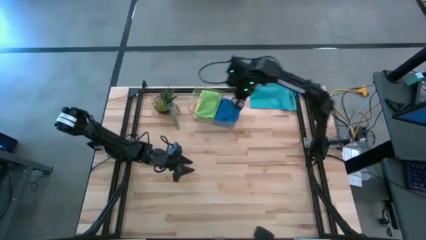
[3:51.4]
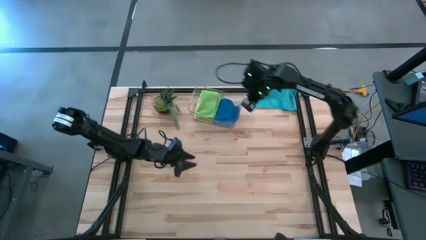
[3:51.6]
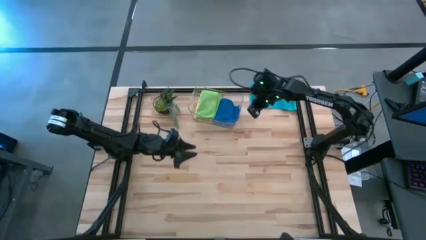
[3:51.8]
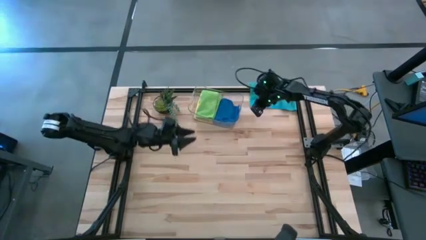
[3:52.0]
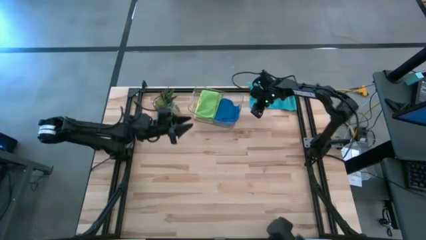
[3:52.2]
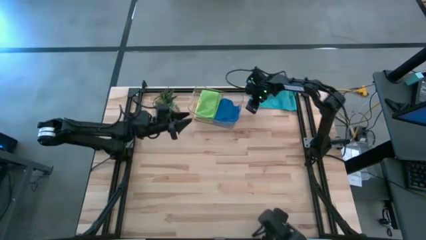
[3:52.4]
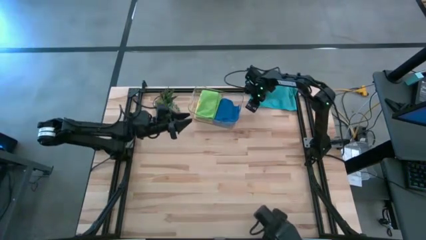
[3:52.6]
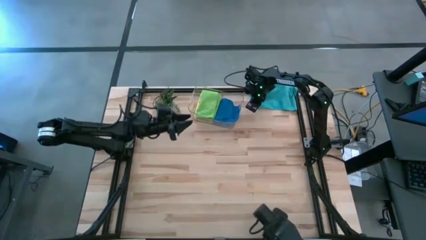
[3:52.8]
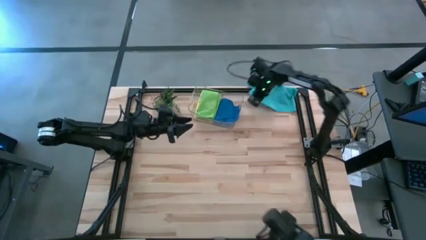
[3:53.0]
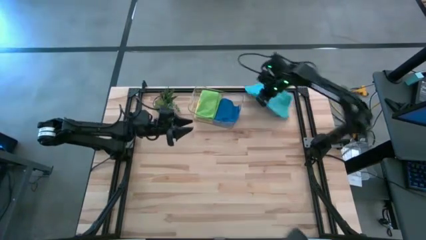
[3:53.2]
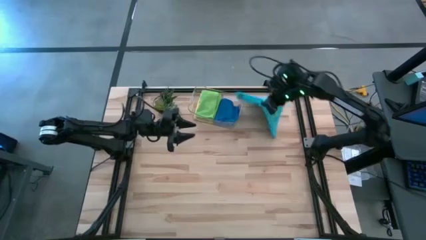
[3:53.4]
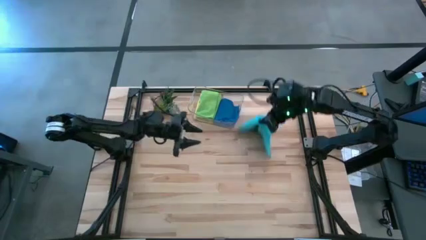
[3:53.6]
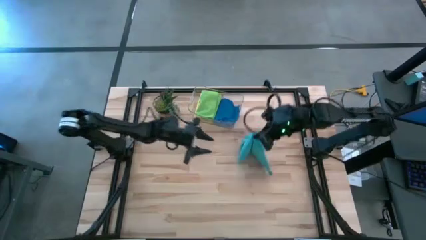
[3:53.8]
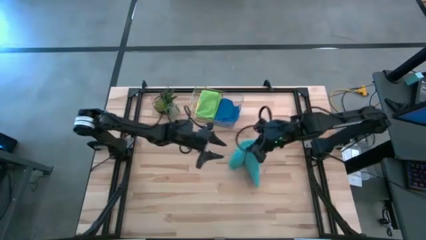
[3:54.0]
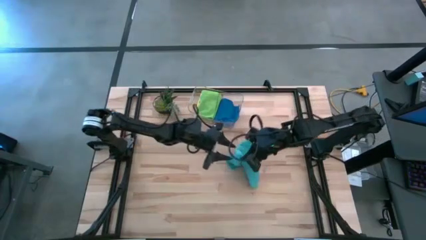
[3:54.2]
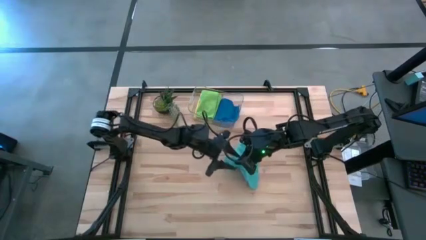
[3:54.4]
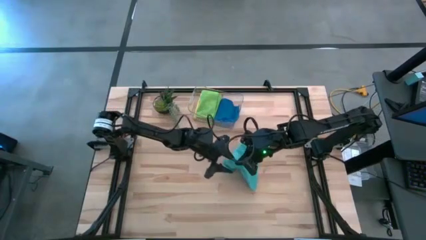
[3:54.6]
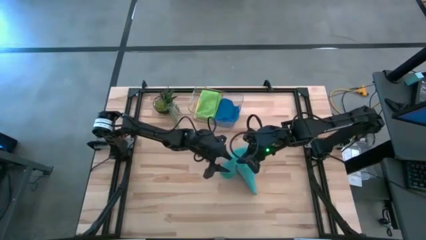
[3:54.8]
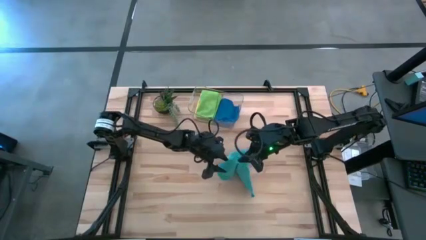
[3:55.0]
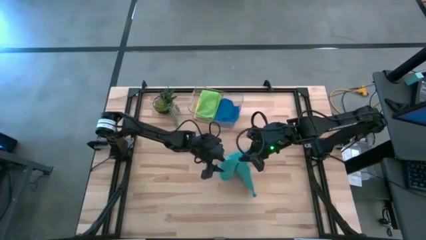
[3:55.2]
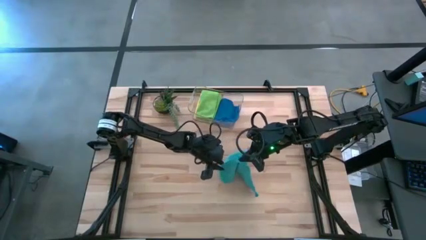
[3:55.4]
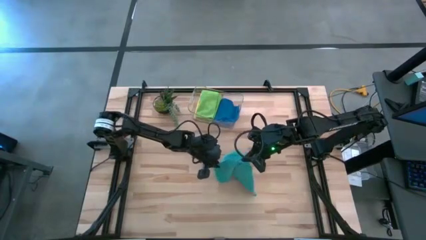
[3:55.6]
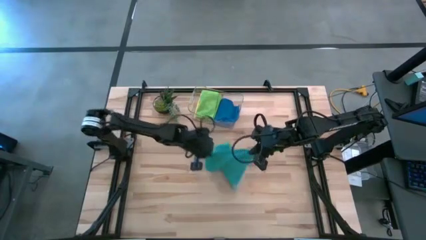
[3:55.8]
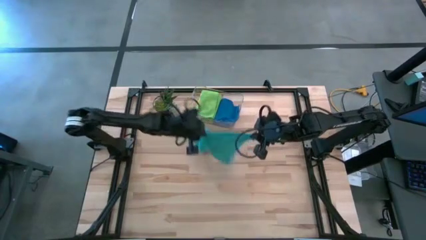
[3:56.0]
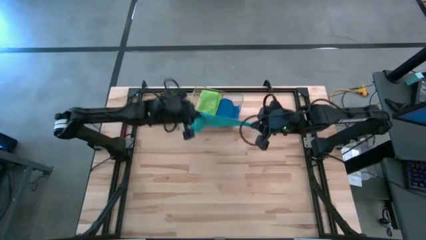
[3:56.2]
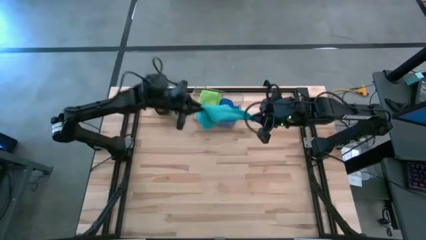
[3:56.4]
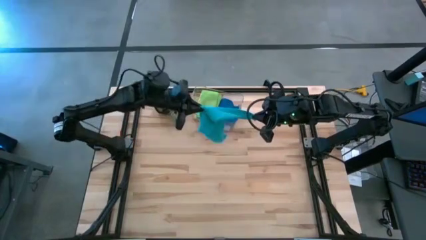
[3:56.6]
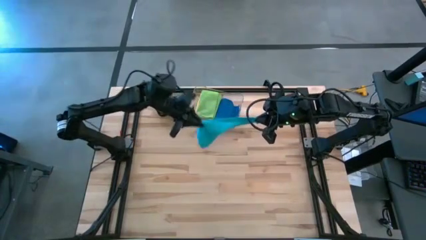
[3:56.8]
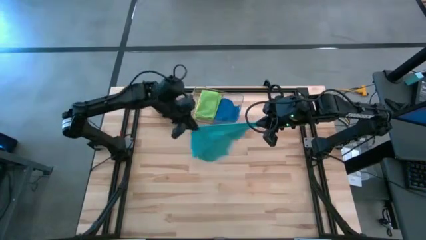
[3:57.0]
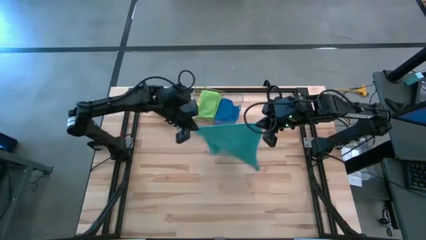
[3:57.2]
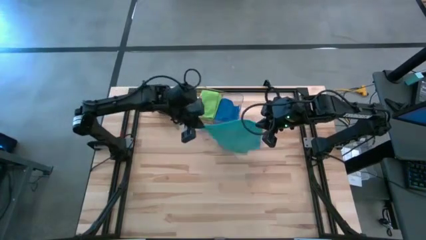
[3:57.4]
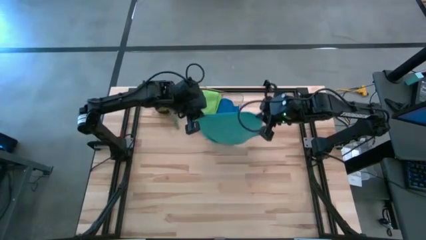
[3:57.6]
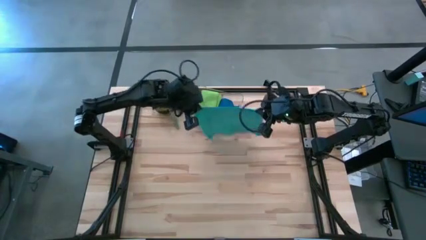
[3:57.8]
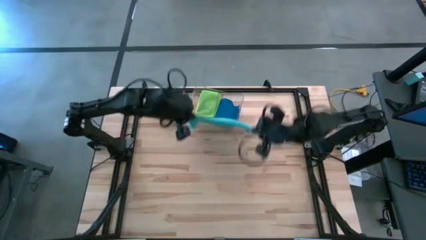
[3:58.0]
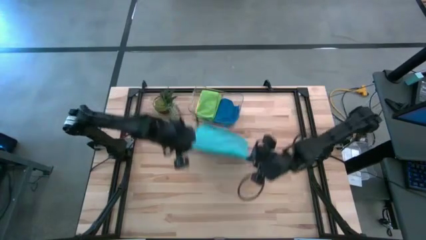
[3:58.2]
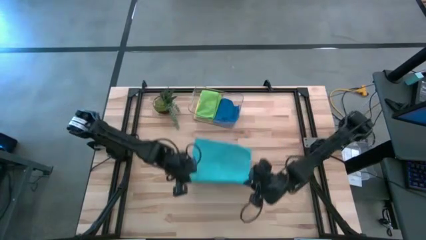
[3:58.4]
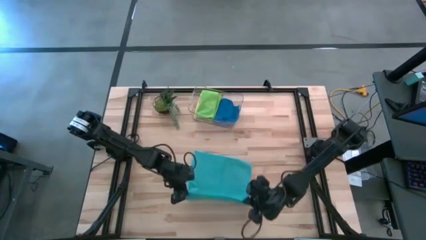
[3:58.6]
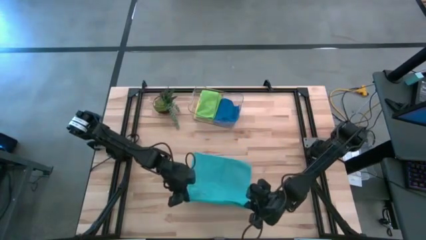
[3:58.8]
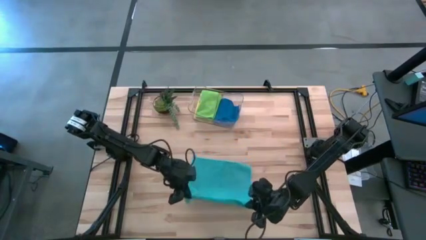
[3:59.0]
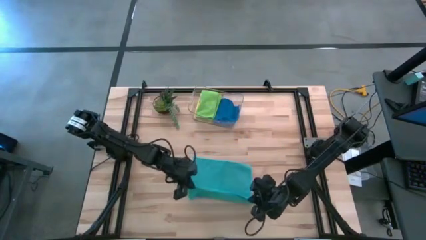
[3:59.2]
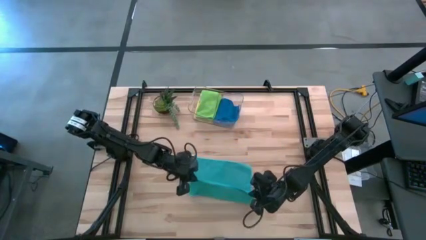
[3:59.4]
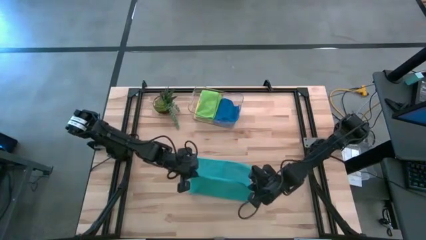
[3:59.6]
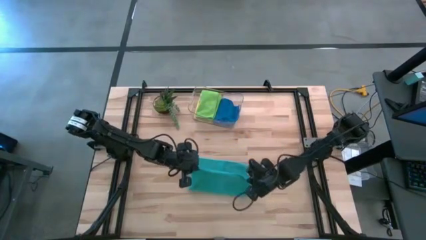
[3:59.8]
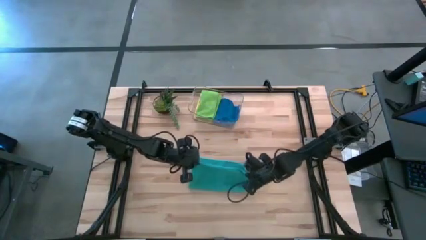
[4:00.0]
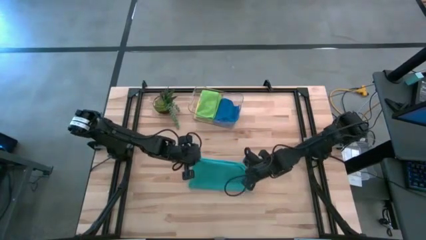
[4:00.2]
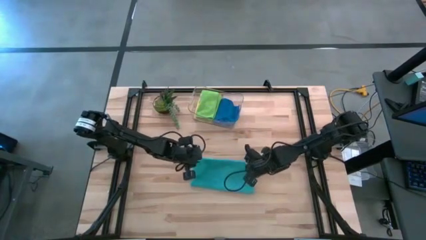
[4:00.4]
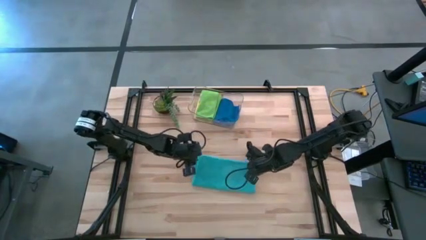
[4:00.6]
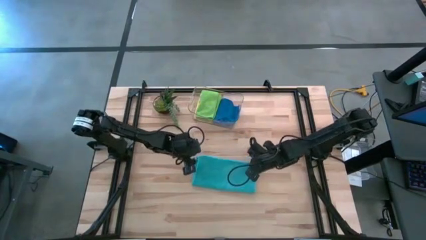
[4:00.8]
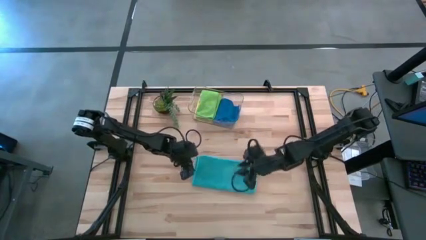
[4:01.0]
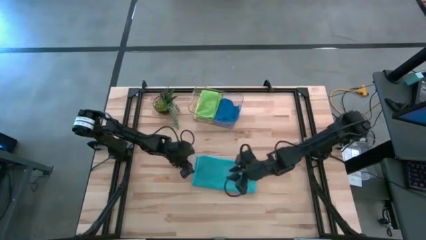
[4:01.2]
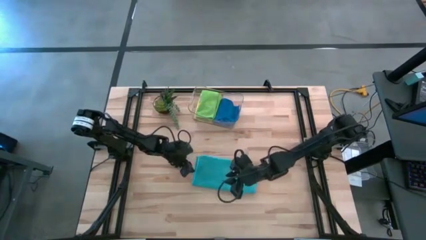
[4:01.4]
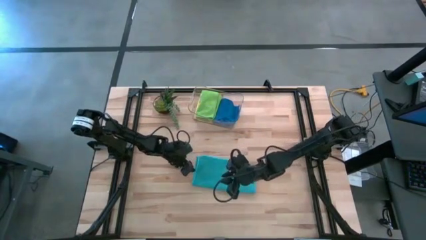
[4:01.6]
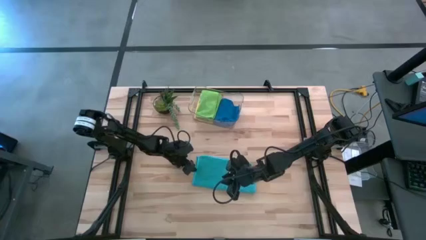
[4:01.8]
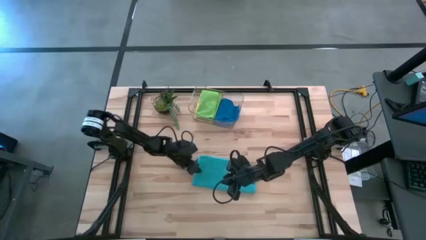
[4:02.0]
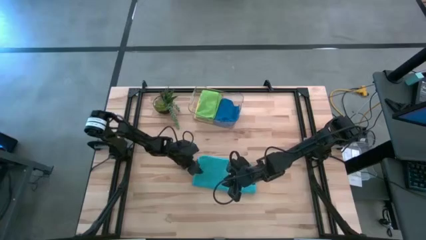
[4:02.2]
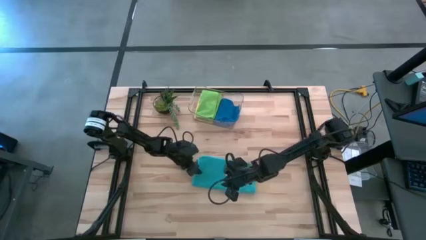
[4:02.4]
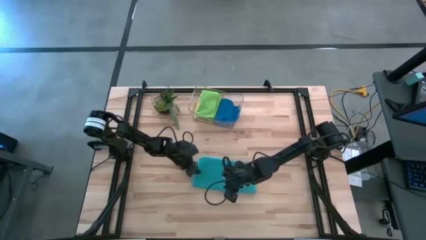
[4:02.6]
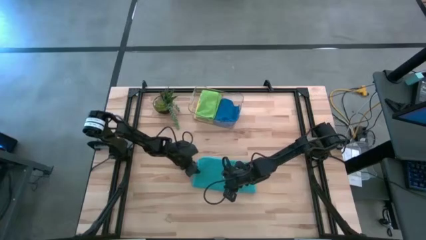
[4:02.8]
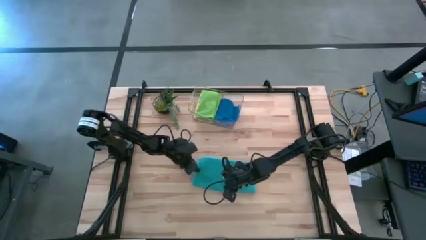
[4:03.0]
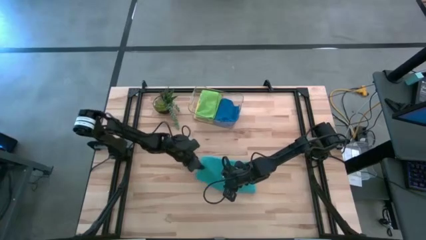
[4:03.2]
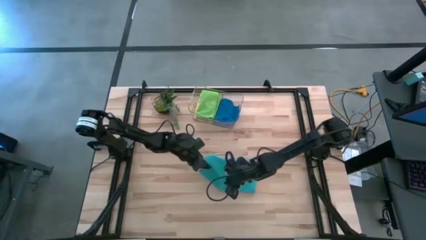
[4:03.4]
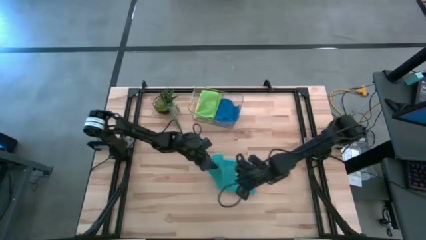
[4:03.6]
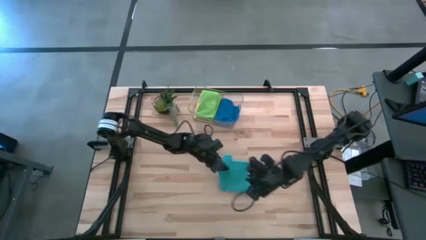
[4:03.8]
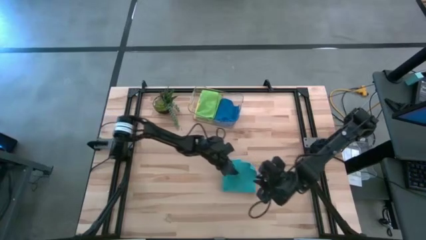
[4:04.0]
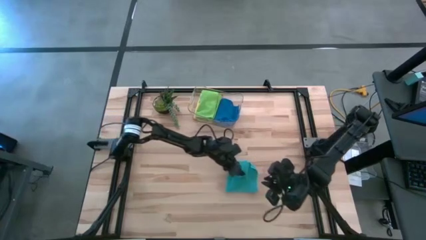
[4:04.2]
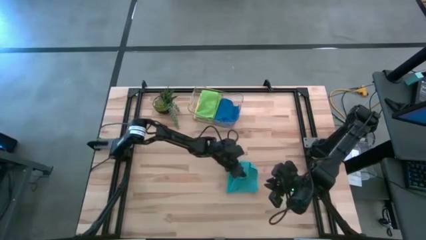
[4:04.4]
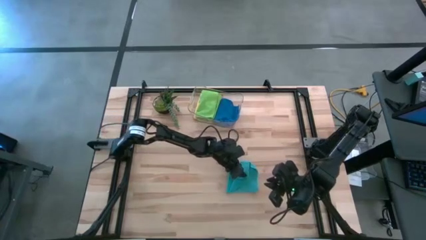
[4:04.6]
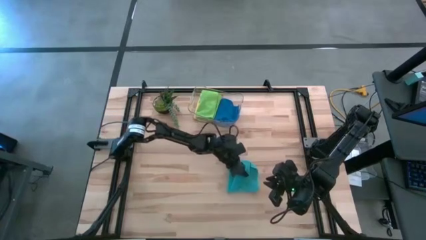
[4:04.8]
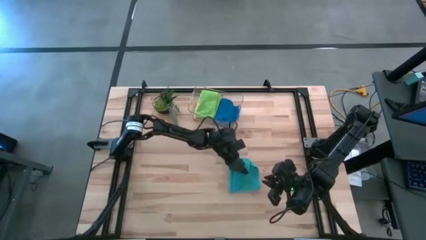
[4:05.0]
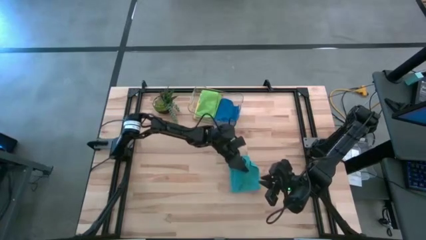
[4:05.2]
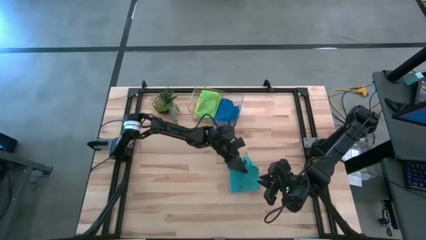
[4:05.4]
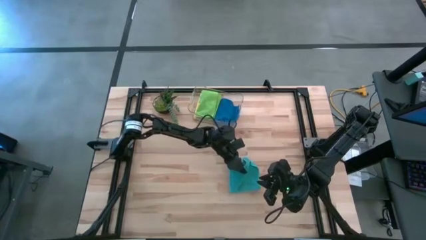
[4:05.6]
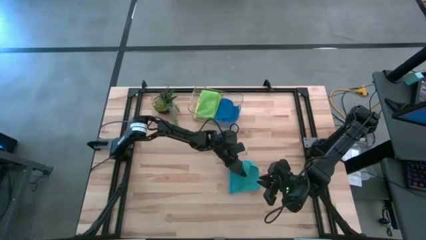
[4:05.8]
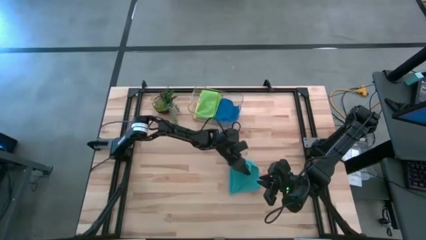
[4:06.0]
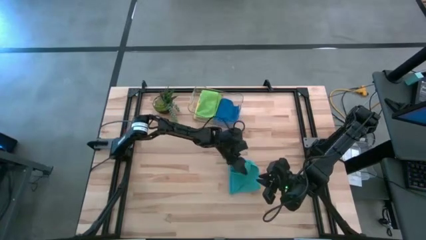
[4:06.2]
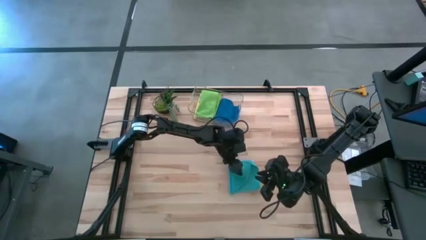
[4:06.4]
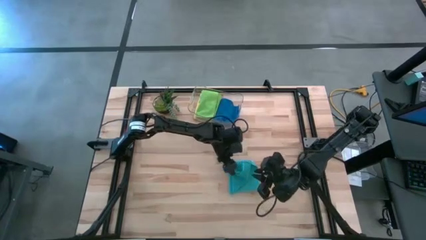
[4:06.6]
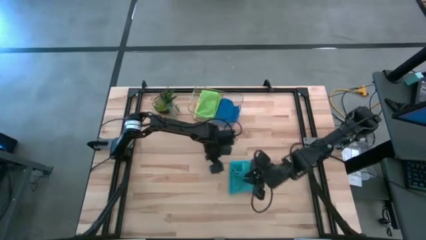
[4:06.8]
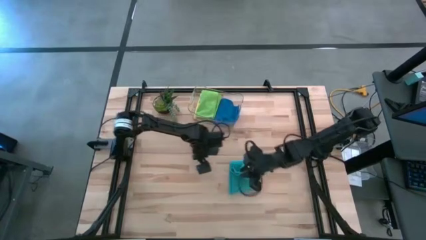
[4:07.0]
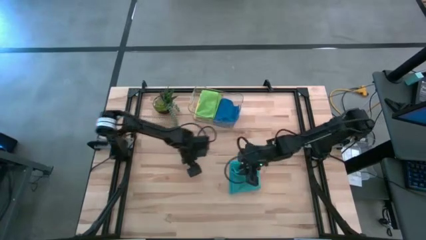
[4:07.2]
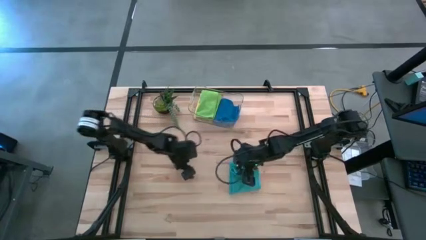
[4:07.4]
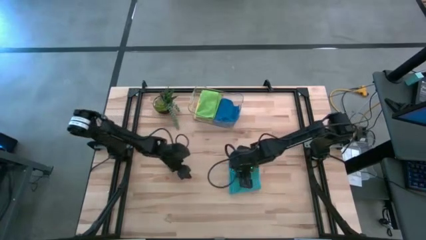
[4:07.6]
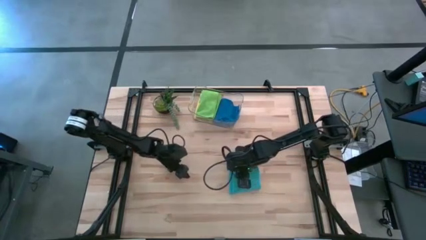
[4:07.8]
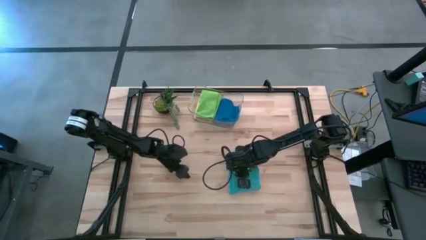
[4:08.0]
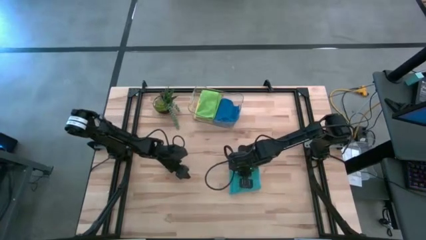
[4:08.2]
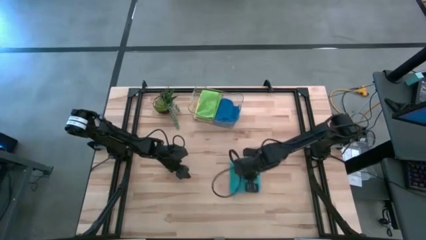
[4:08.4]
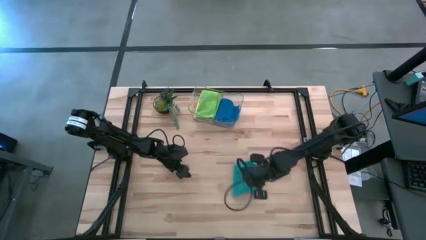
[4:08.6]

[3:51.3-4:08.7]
Task: Fold microfiber towels
Fold the blue towel
